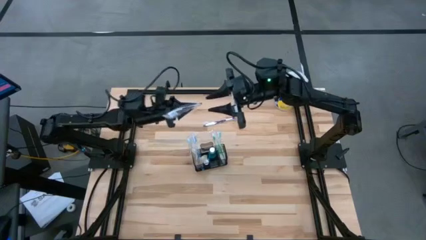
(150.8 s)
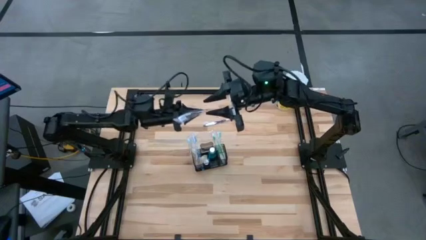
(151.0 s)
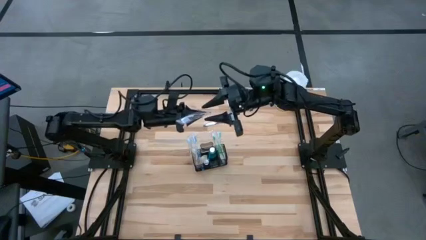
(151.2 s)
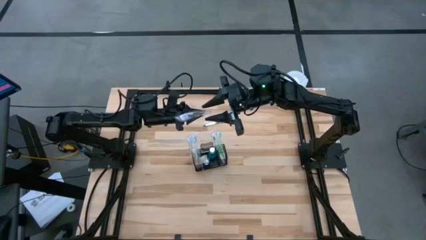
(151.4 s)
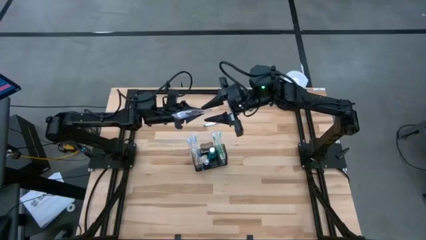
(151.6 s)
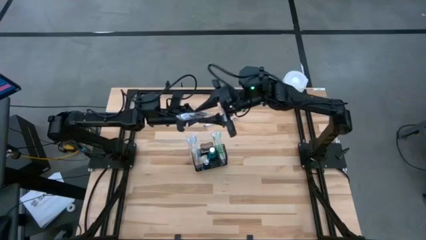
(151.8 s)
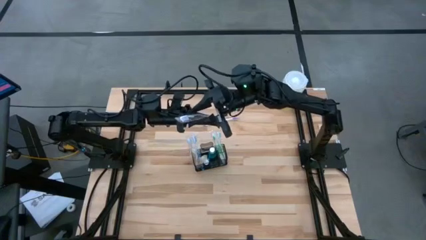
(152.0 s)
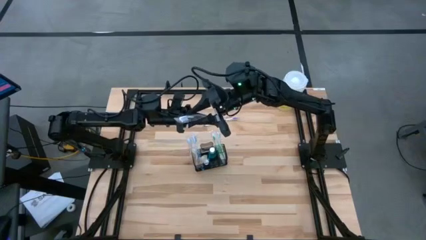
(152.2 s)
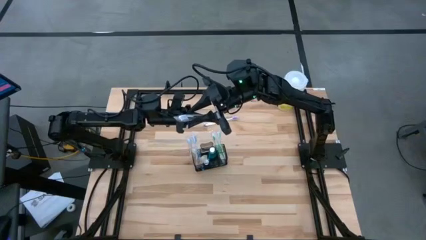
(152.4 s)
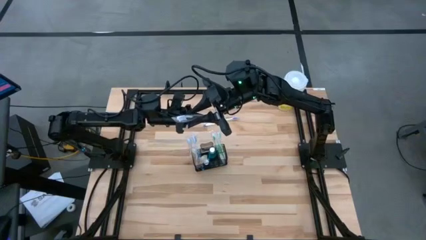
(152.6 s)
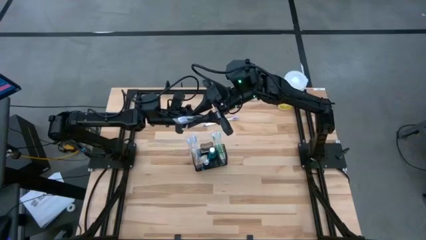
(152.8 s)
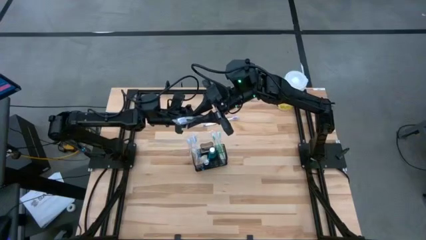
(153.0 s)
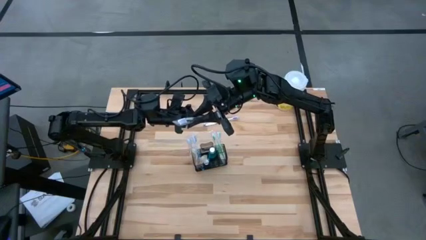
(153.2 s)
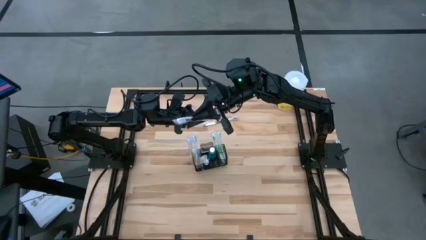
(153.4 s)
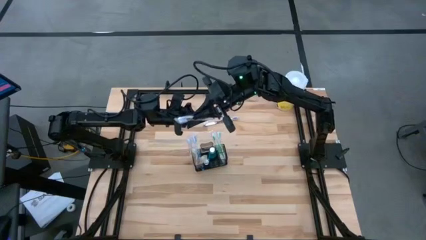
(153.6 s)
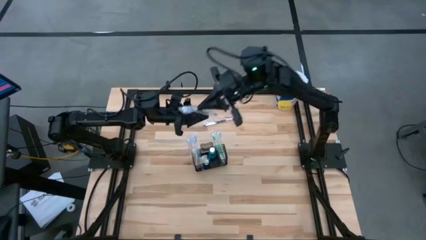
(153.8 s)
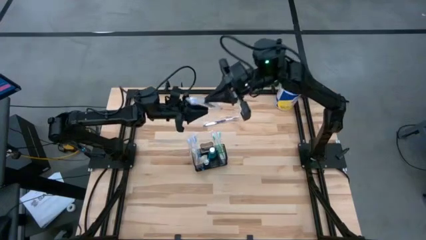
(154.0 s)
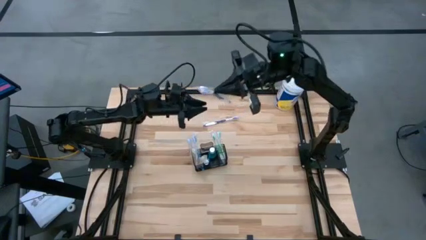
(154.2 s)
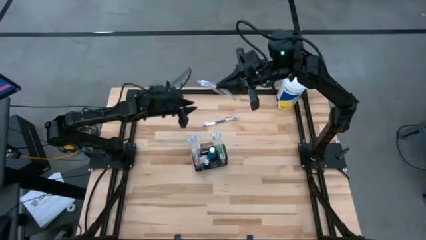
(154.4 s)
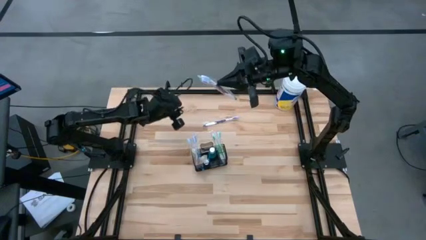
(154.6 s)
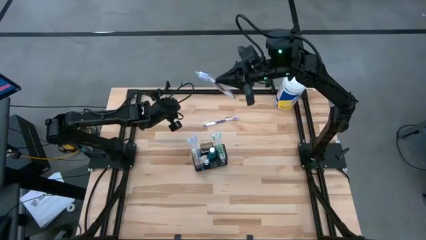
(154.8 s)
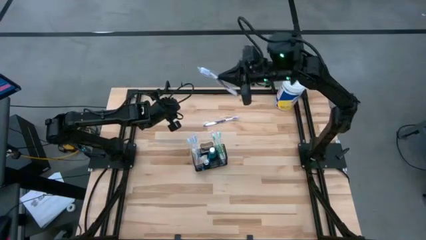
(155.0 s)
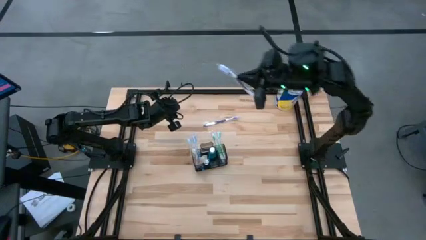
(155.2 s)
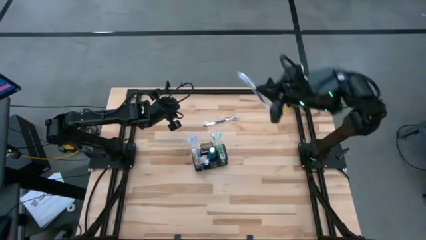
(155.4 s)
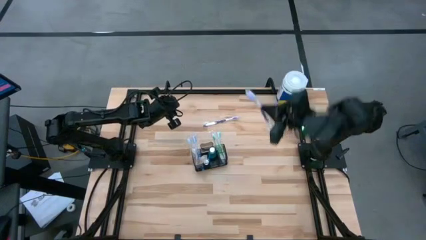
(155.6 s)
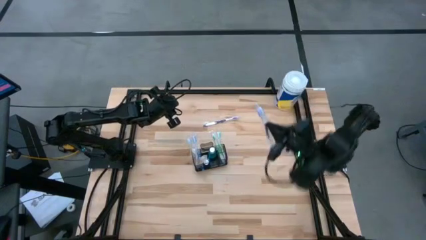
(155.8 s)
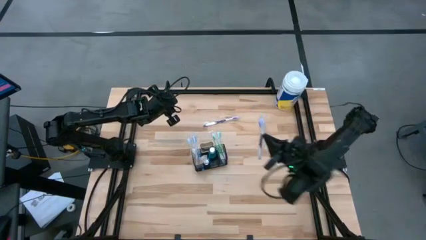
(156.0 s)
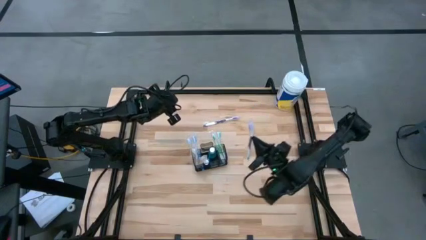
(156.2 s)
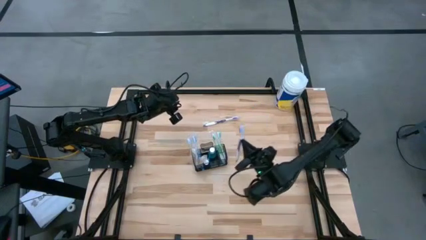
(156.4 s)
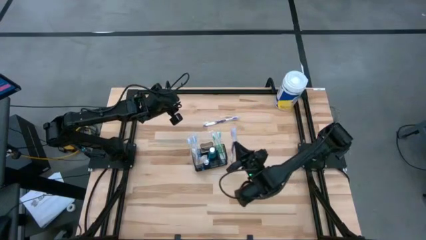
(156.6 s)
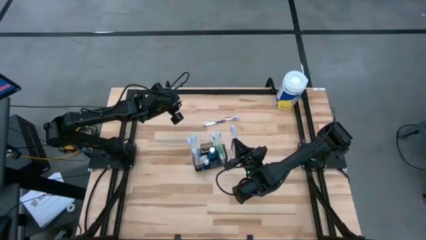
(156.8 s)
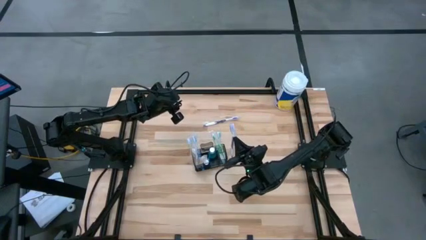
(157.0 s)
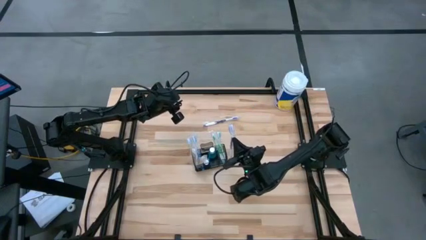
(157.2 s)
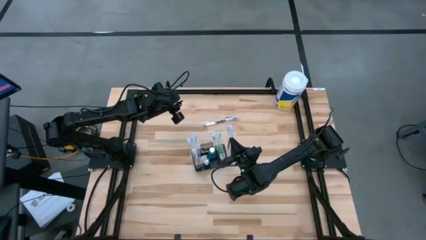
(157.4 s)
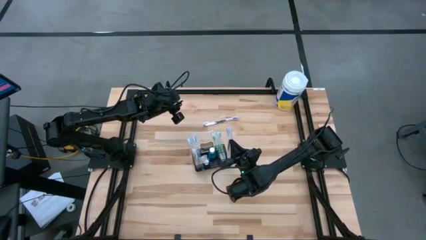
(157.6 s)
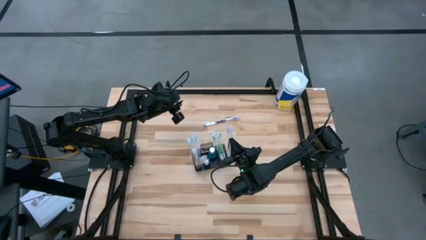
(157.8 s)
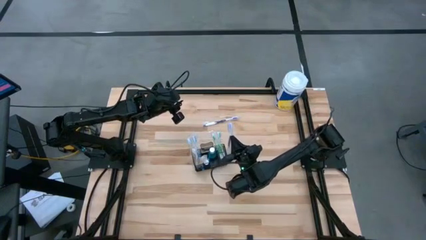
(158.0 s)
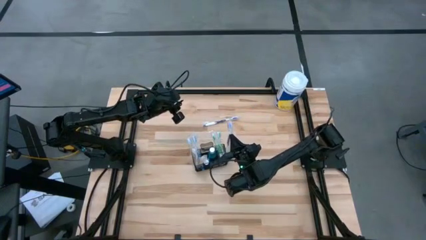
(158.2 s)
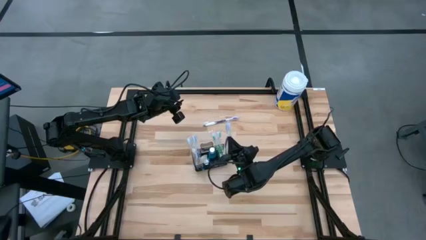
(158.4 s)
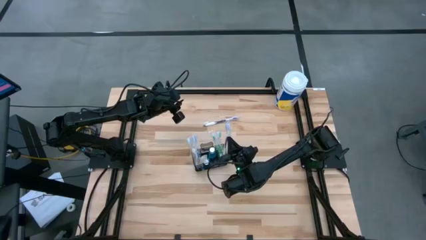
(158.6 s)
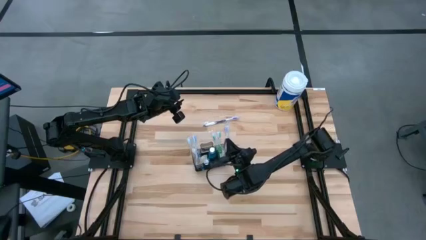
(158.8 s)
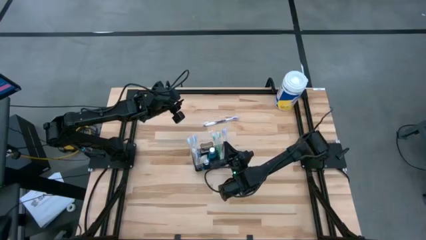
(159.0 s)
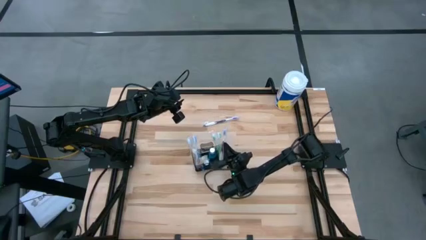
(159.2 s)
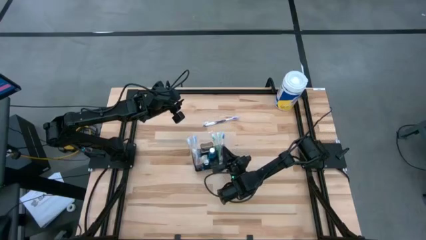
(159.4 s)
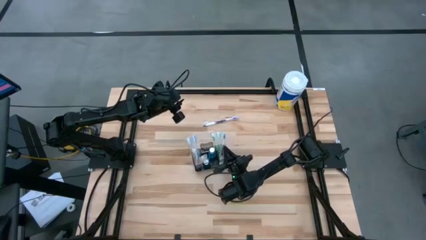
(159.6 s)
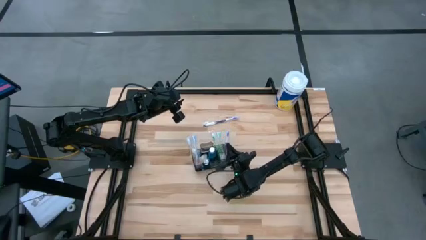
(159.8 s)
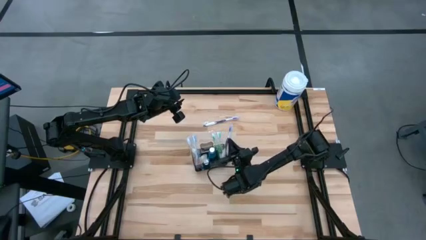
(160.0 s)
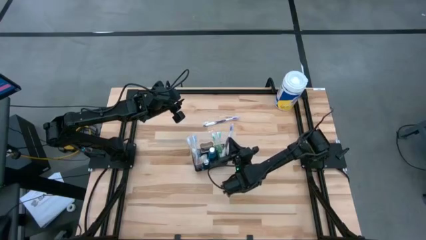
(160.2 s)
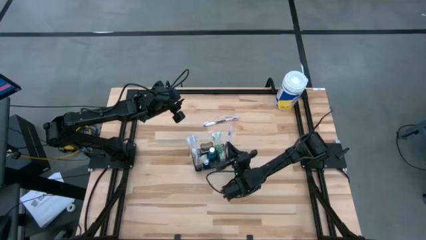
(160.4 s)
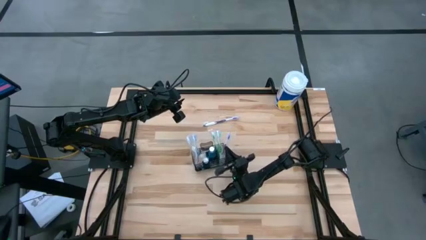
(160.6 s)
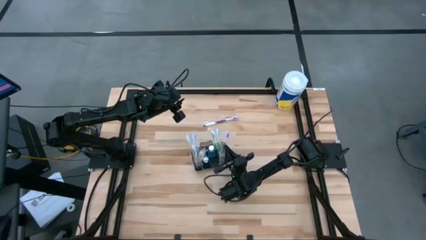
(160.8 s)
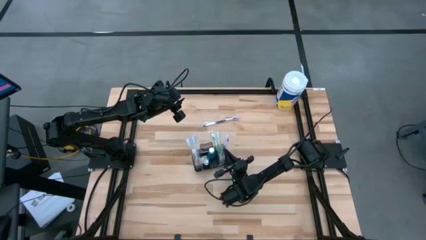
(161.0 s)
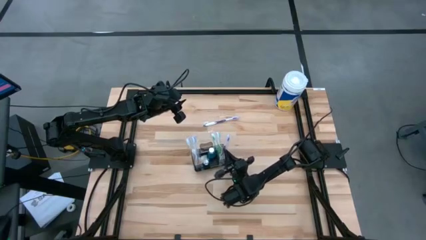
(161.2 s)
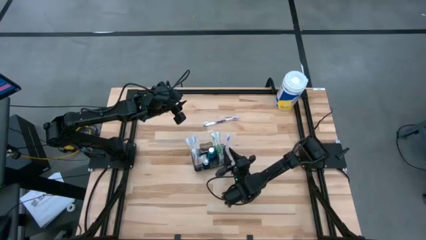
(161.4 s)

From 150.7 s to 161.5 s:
Task: Pick & Place toothbrushing station
Put the bottom purple toothbrush into the mesh organizer

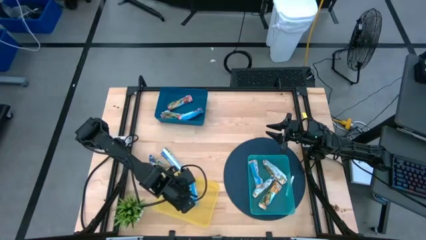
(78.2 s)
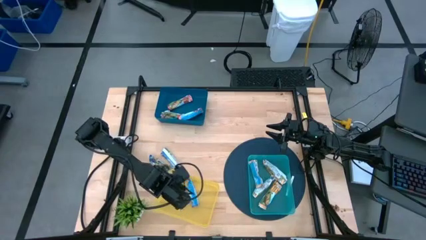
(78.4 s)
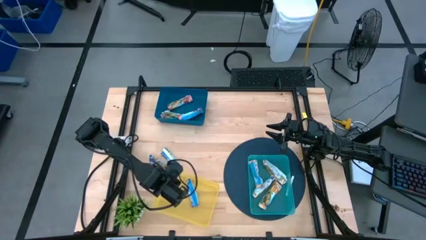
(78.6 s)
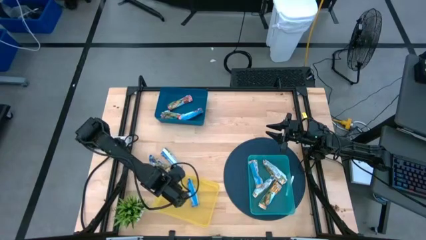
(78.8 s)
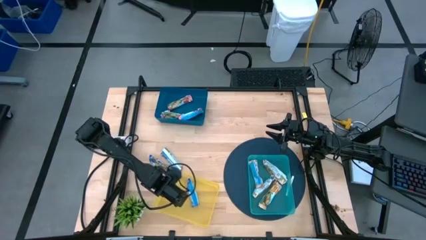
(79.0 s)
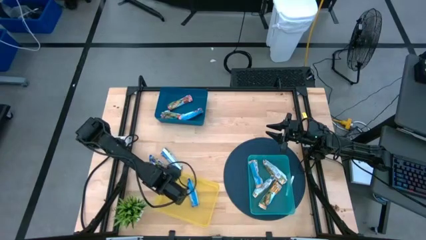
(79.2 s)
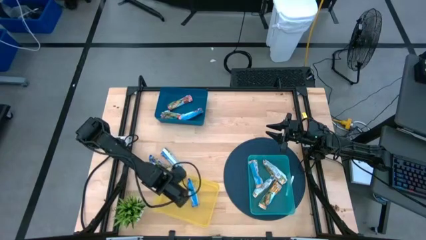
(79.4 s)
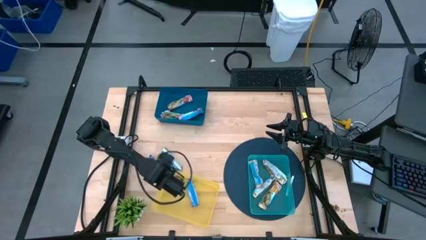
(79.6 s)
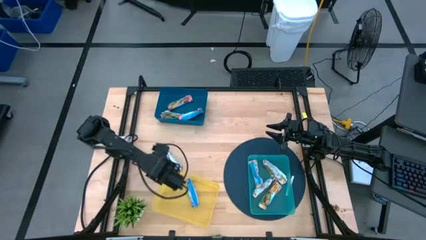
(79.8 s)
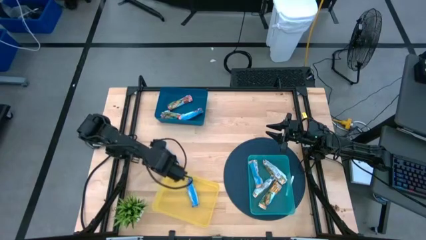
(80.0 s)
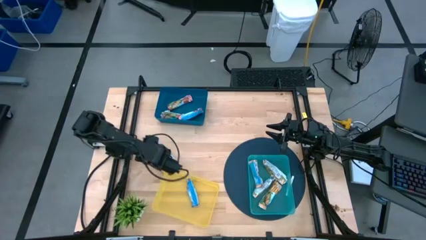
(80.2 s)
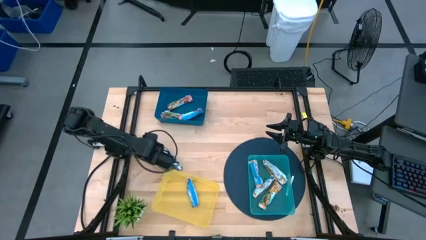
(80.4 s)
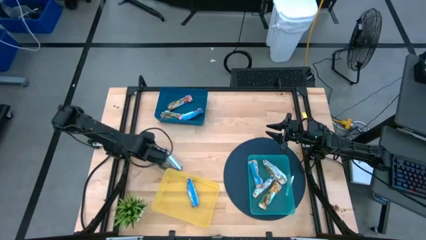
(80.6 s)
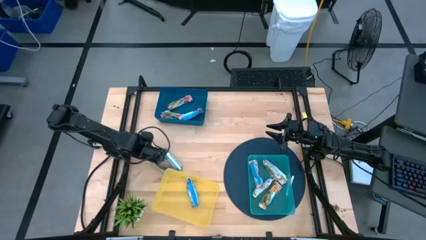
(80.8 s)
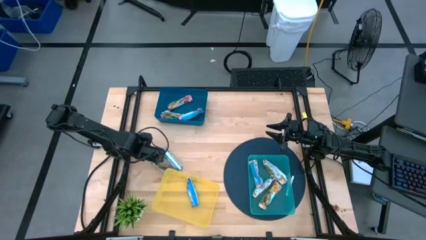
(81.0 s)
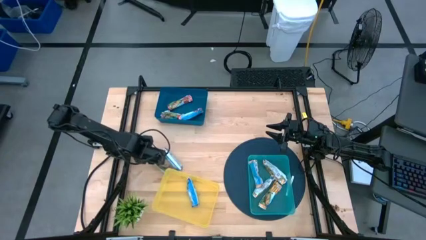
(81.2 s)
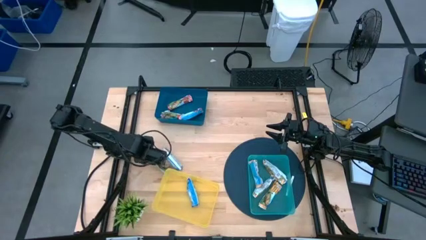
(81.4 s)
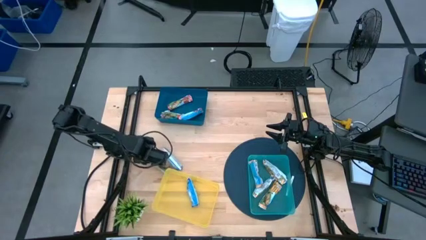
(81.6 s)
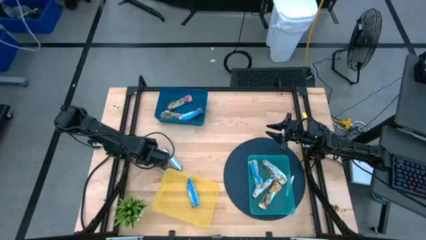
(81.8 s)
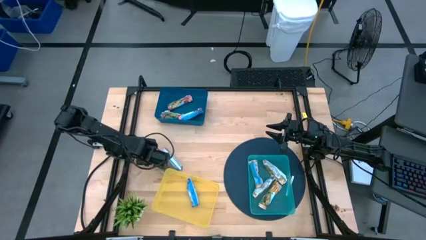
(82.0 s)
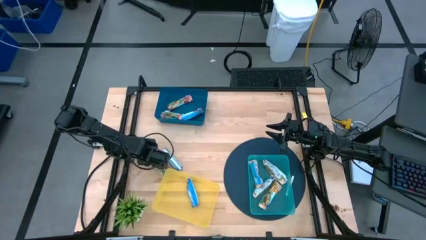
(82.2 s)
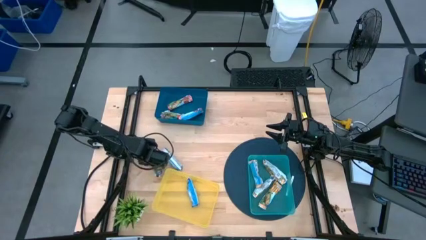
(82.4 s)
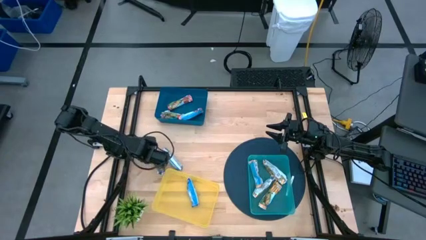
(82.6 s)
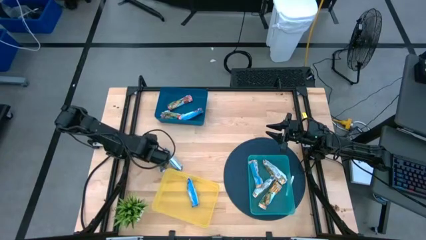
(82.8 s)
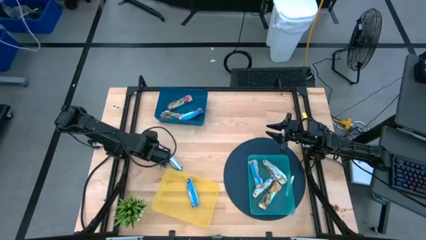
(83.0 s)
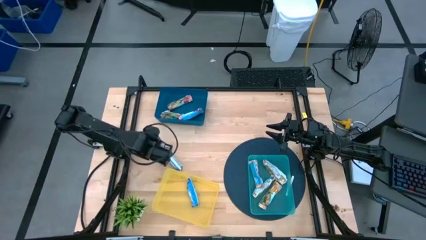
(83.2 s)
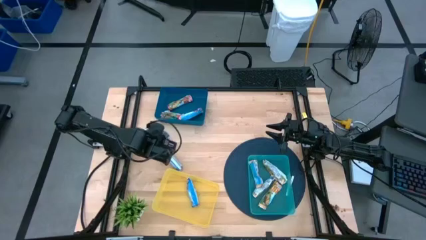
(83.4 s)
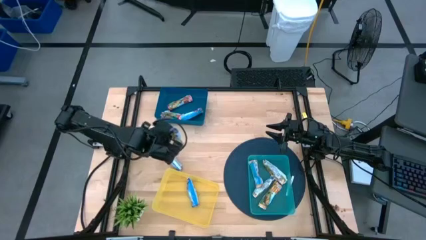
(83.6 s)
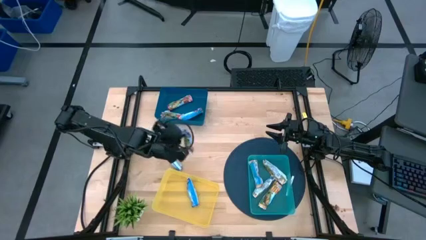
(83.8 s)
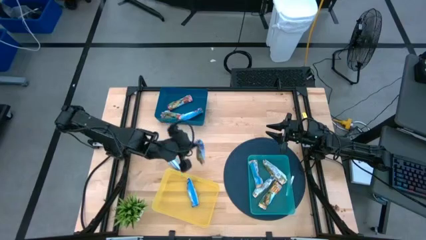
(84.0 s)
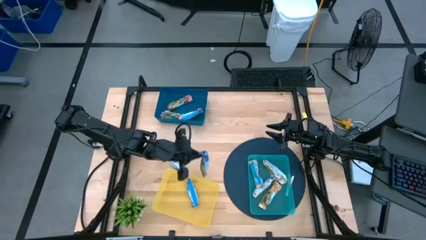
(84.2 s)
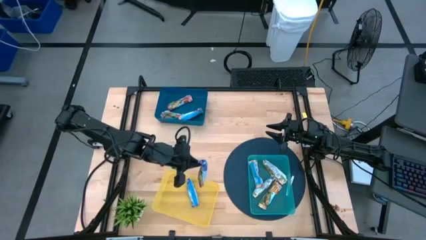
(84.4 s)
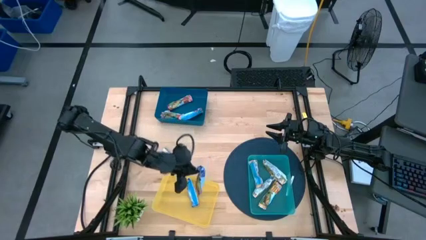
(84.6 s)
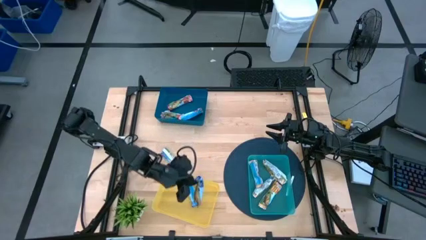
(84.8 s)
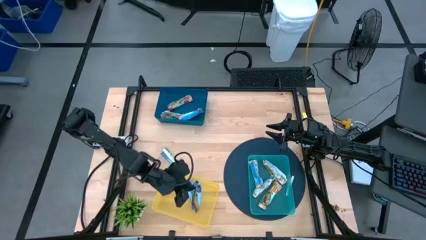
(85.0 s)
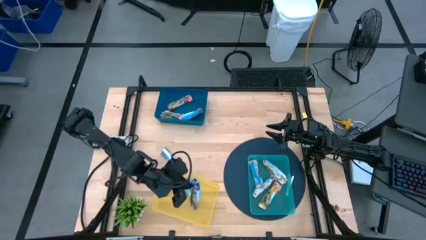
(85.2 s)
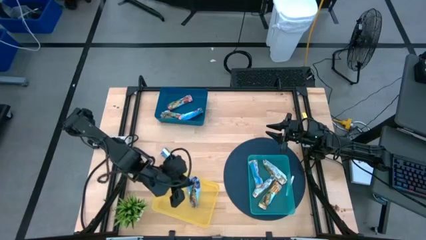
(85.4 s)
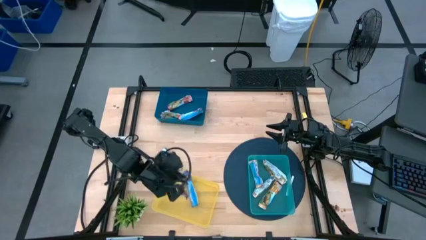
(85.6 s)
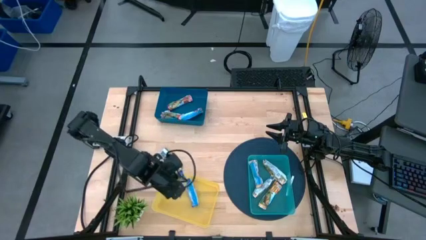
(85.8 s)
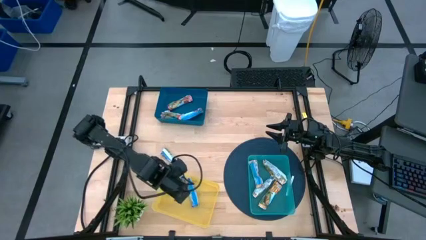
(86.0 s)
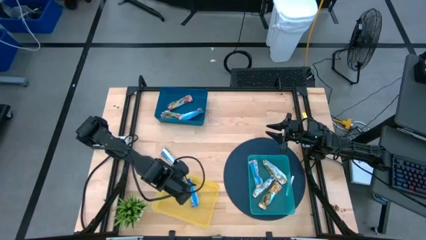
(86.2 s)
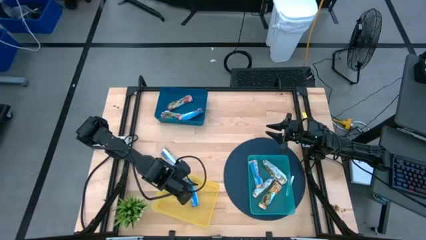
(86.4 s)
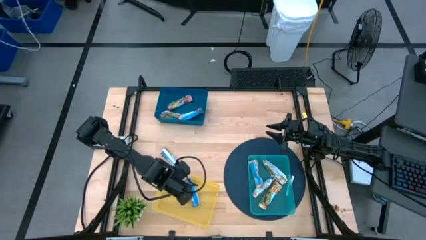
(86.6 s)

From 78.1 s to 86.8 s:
Task: Pick and place Granola Bars by type
Put the left blue granola bar into the yellow bin
